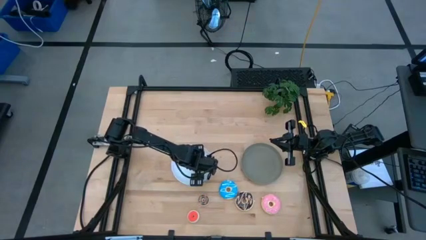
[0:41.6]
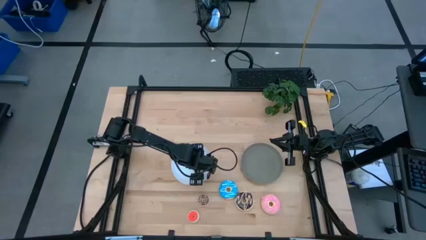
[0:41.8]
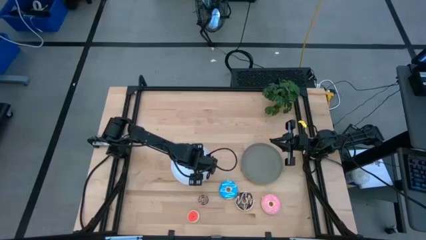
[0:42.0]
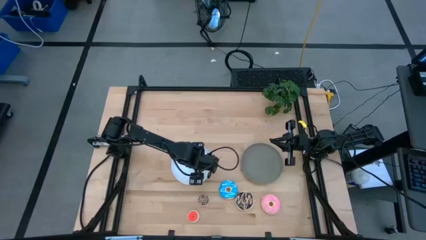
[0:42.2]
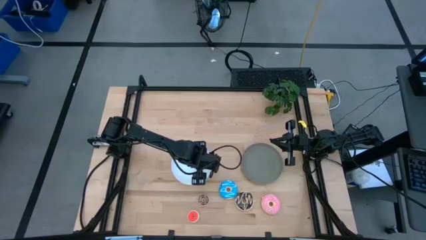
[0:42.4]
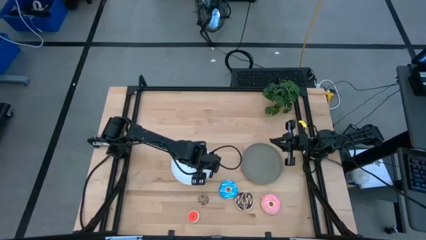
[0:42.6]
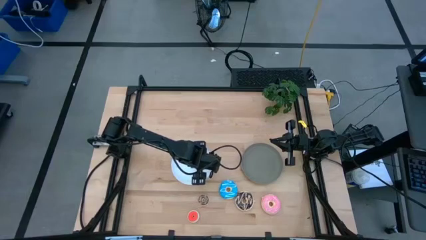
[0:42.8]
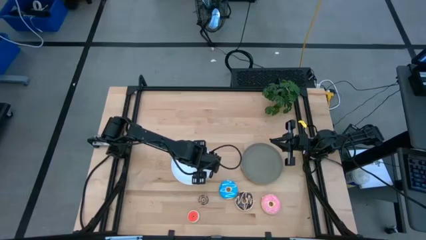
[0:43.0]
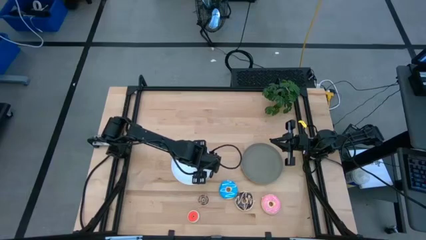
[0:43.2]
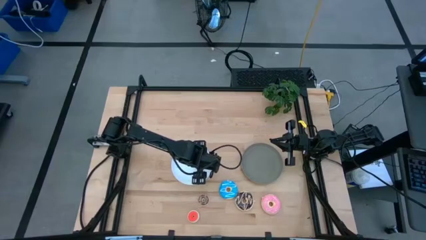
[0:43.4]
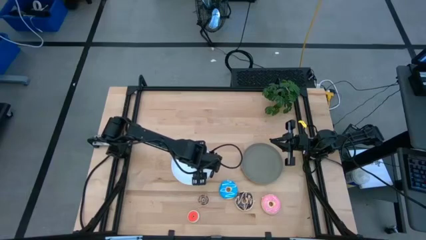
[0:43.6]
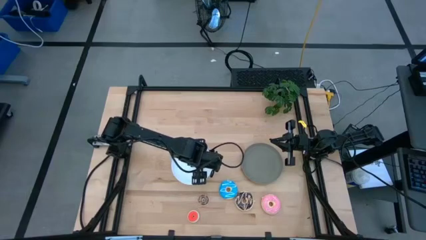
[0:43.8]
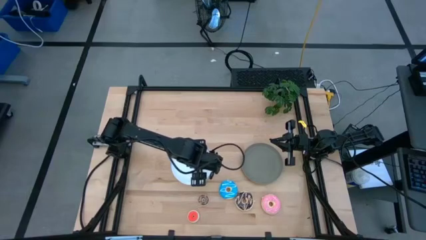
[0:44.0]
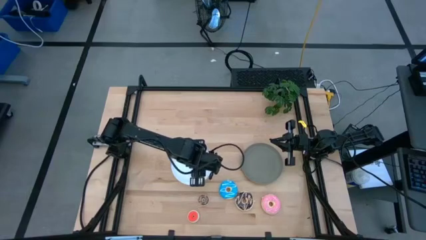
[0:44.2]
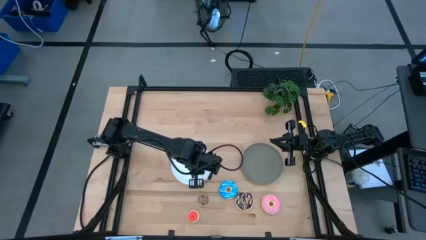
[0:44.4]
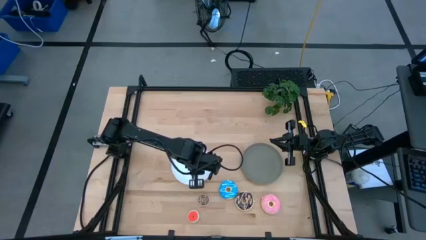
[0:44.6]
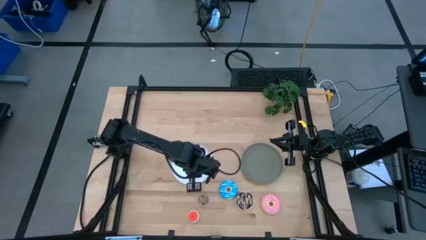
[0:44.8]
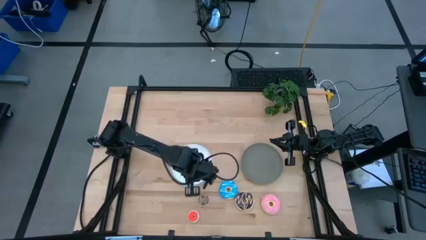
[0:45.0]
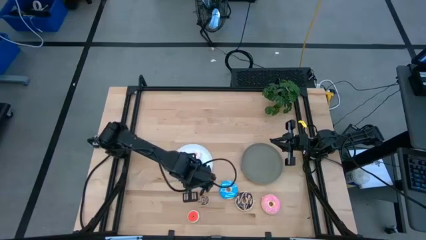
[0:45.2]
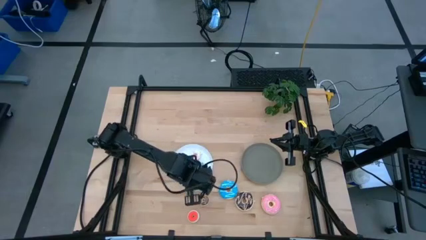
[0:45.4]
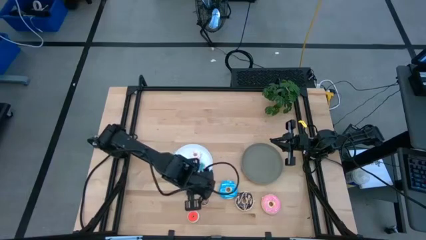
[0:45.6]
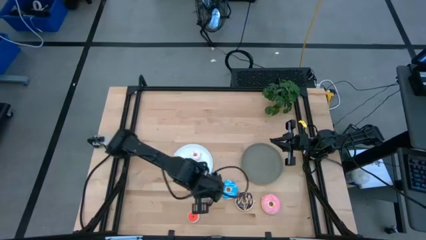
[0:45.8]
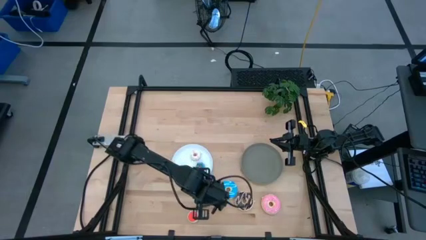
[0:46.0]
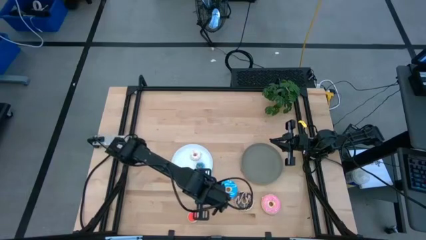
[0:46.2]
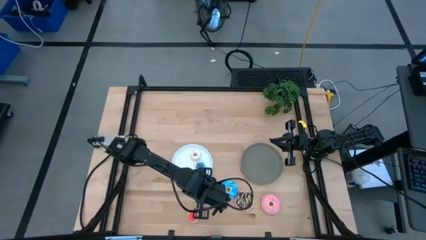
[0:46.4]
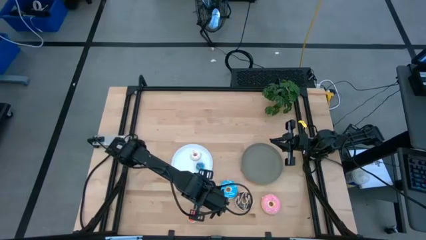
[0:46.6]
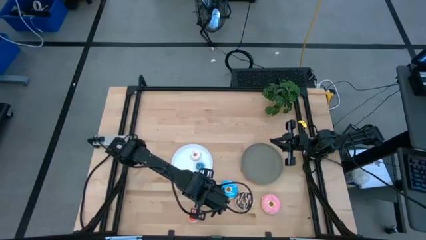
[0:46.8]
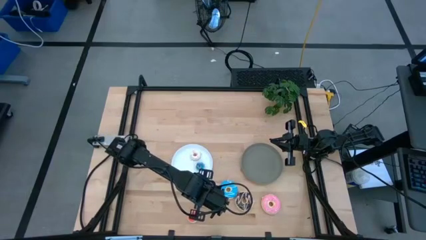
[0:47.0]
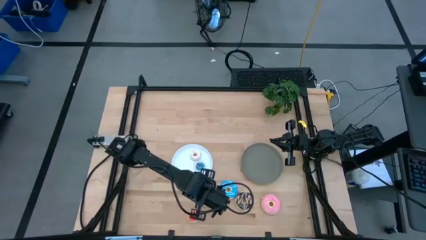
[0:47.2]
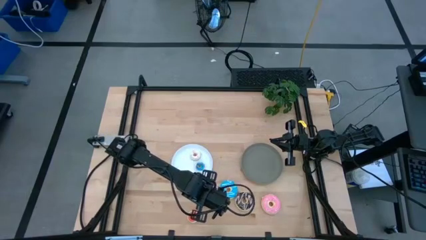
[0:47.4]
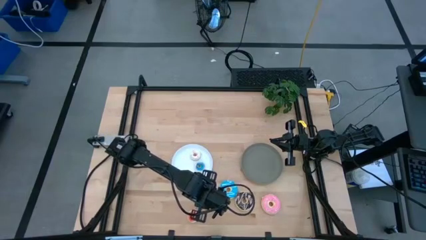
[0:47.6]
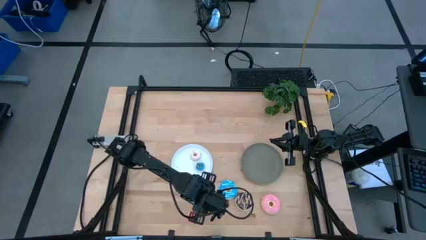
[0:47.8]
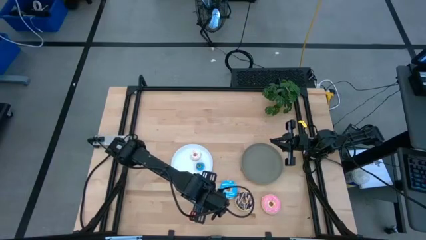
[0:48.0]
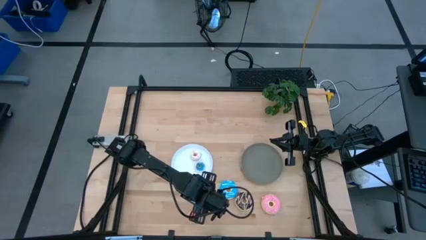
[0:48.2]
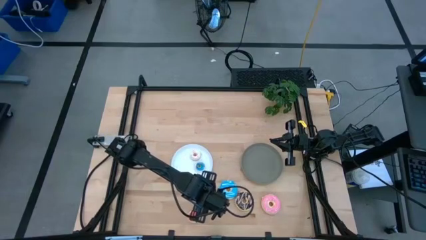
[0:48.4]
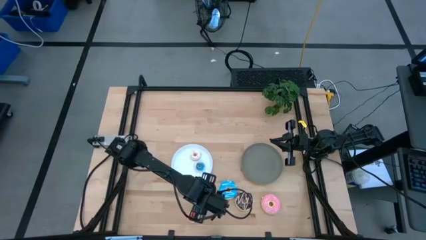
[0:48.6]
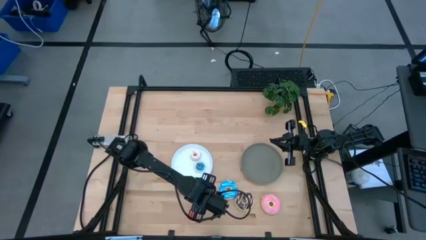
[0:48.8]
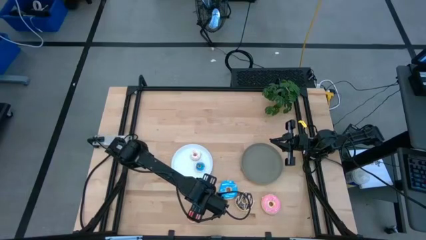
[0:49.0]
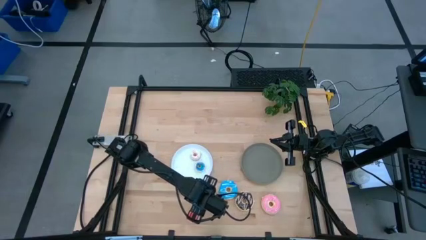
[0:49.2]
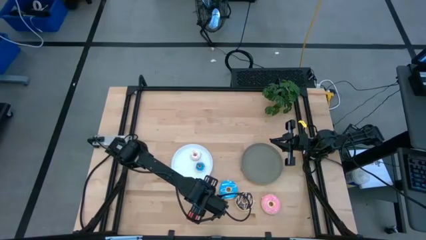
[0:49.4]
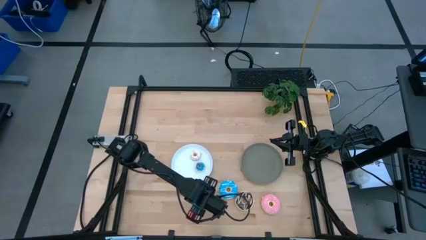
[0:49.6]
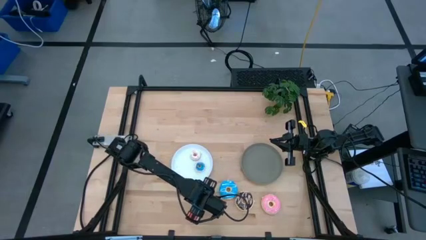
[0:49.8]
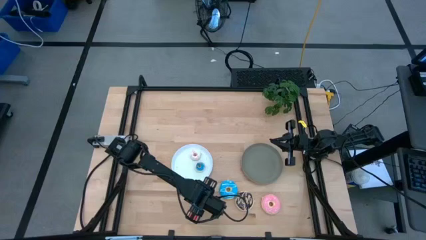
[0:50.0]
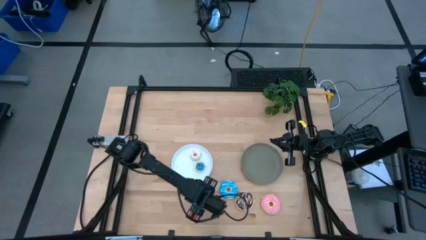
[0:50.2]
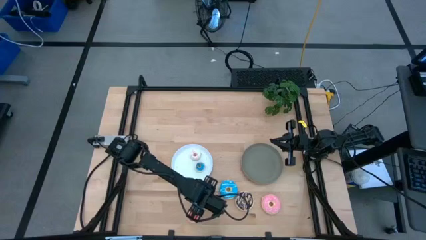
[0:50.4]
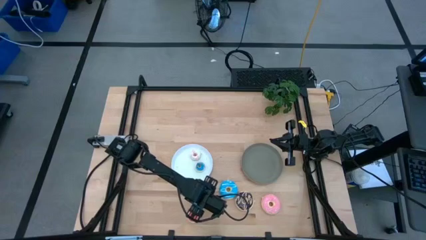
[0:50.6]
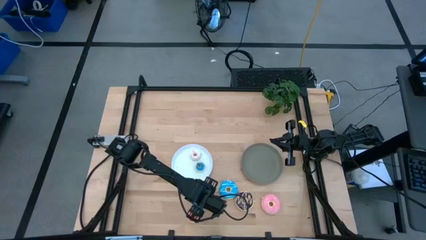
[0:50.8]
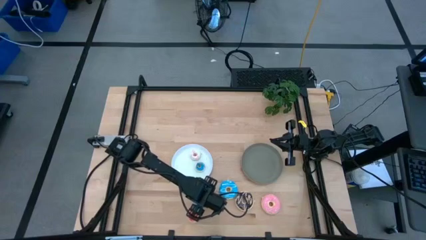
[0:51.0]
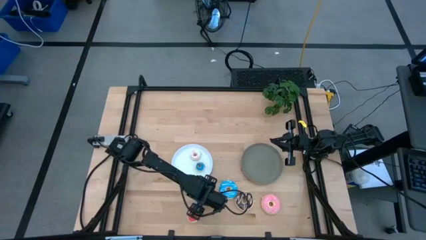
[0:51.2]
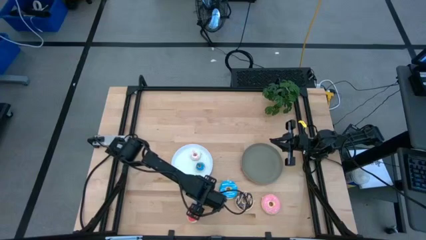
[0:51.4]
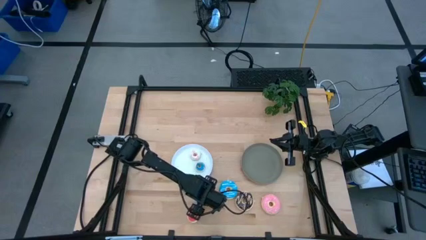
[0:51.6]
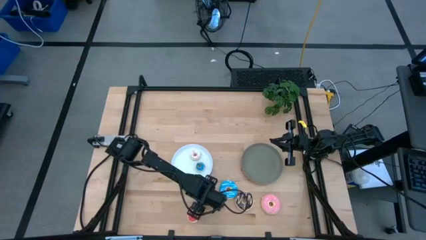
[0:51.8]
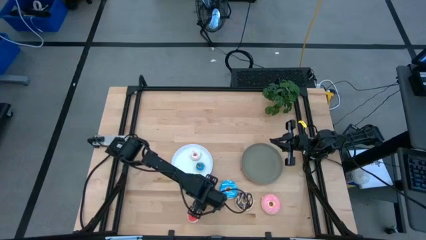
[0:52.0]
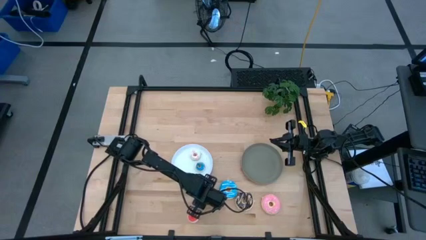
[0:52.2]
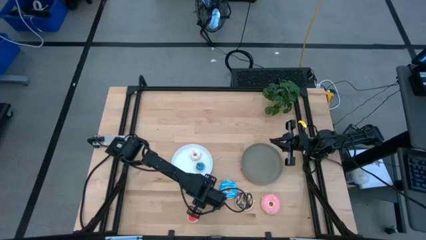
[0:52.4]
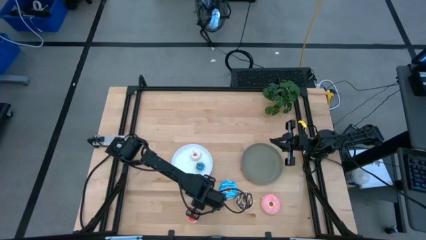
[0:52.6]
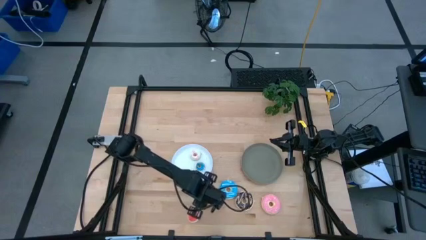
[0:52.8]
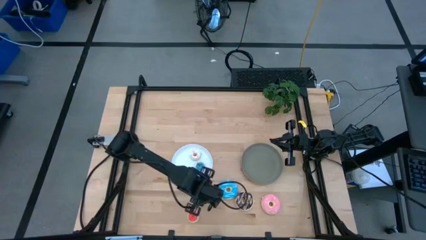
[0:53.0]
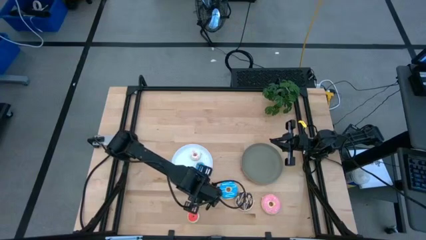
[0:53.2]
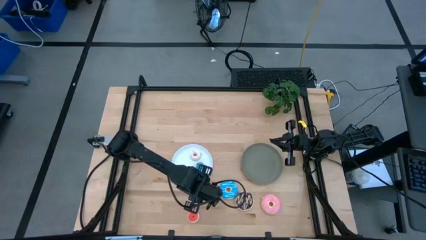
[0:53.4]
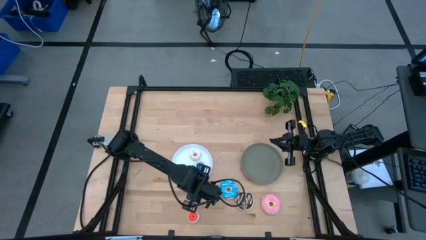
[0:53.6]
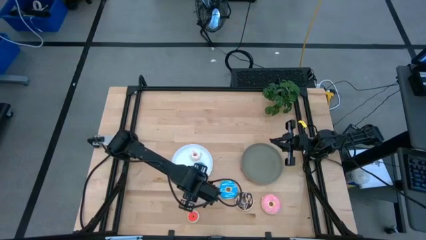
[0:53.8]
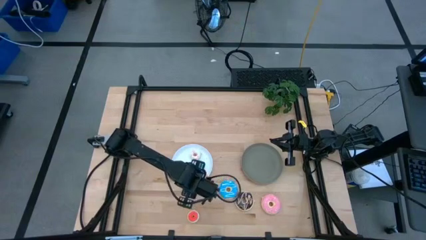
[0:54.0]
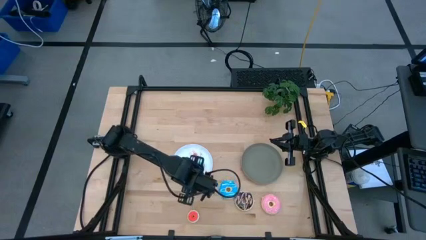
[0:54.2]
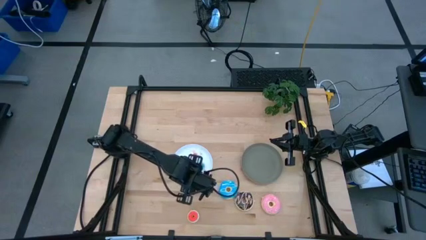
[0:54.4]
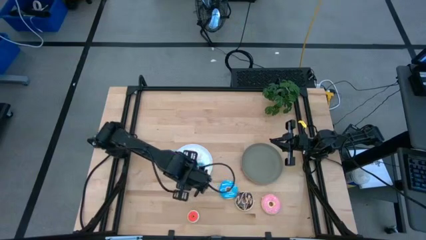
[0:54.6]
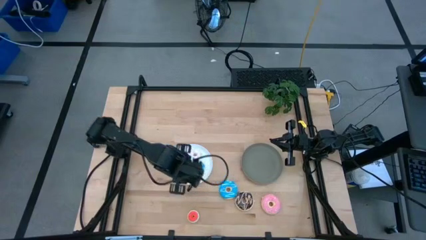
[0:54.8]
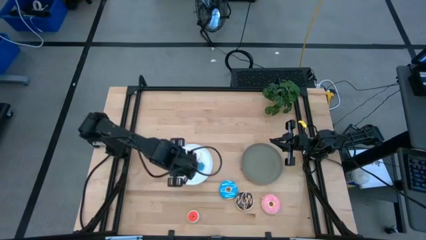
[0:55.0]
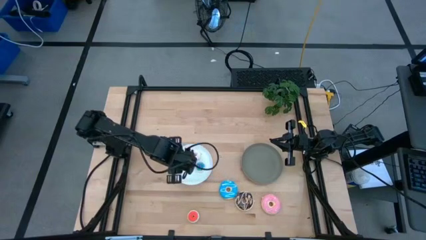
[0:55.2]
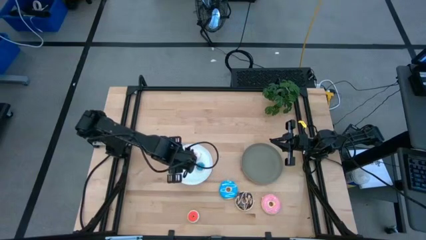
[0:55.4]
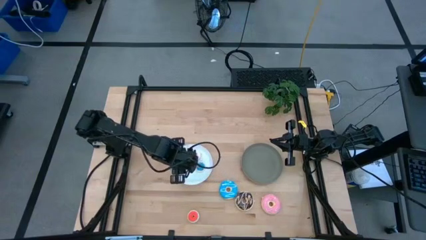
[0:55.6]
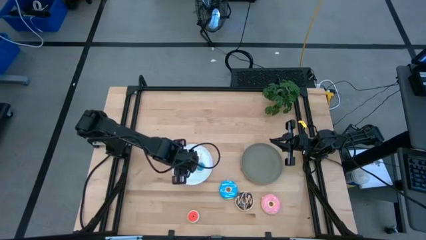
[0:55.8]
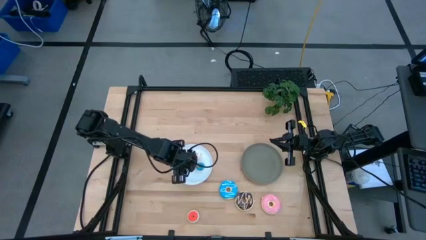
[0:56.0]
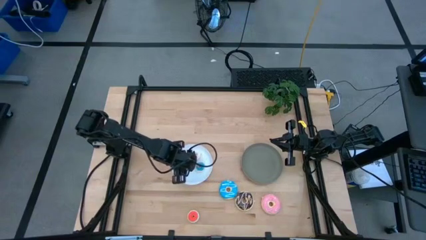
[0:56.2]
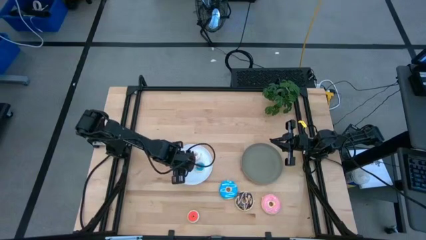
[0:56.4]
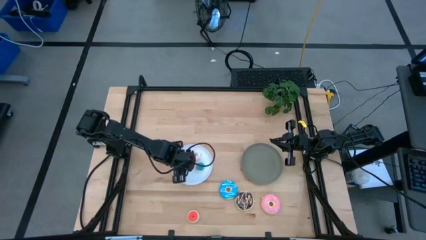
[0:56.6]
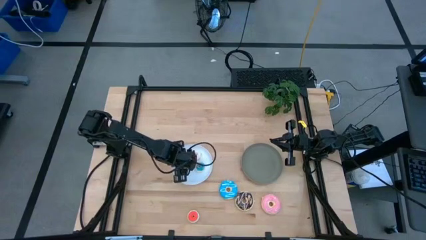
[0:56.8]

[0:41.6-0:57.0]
Task: Pick & Place donuts
Put the small brown donut on the white plate

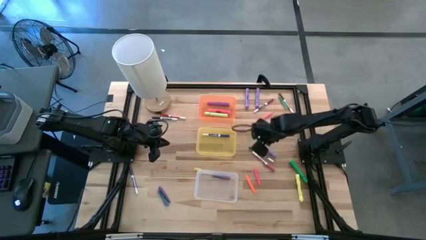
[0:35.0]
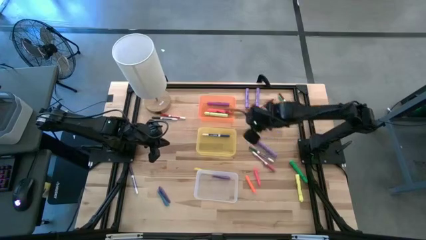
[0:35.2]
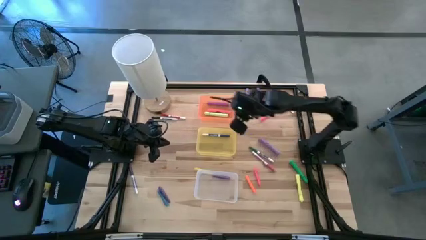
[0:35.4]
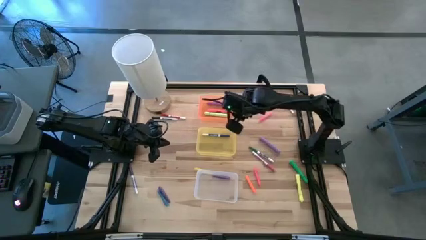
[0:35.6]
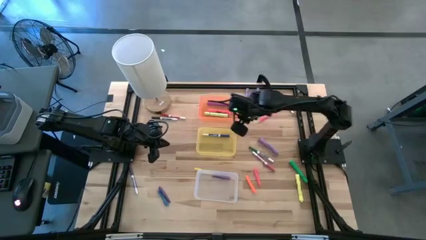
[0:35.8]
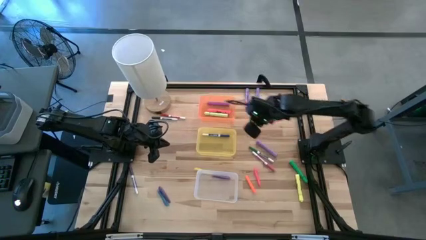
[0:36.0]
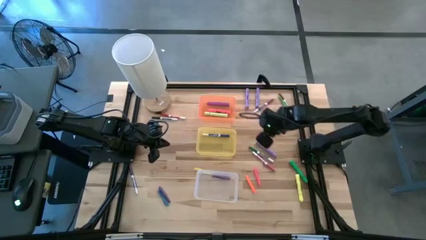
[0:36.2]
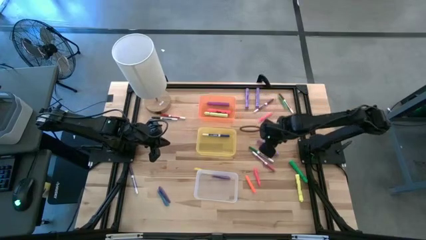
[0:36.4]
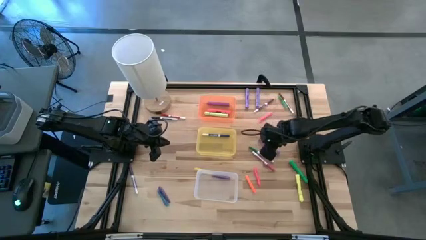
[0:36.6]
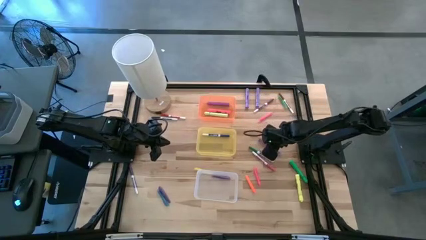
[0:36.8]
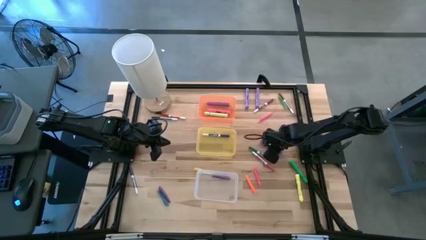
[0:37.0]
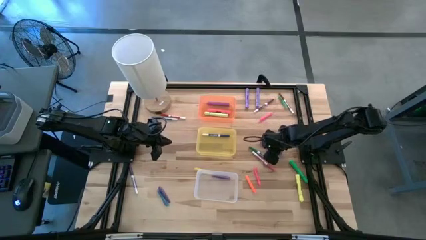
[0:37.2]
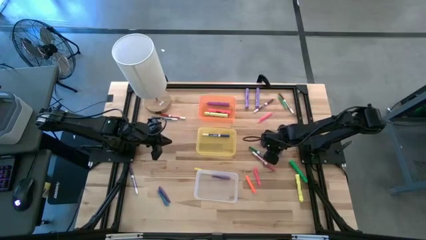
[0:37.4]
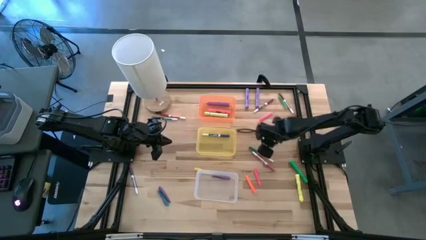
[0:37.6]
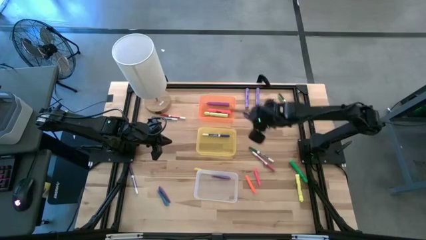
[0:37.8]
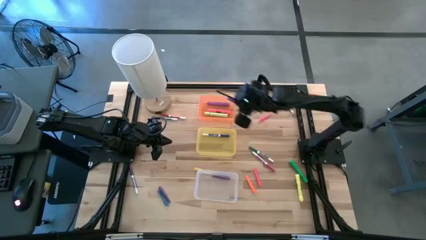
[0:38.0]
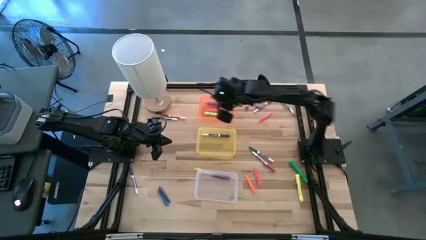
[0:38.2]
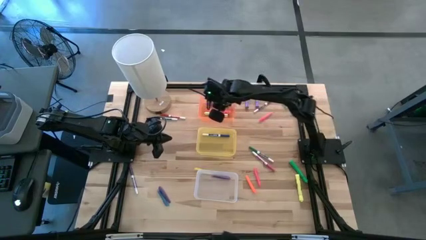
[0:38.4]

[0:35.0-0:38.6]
Task: Pick & Place Markers
Put the bottom light purple highlighter pen into the orange bin
